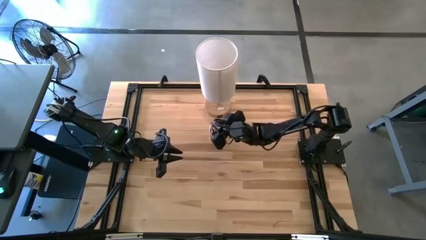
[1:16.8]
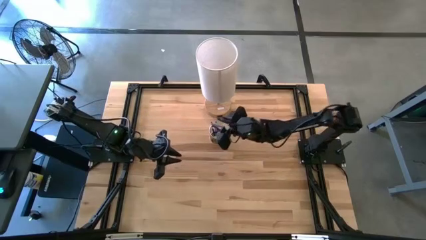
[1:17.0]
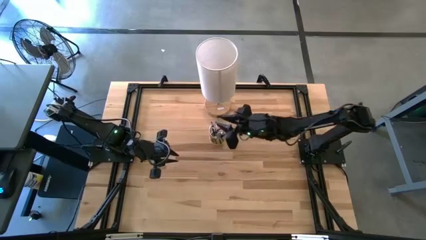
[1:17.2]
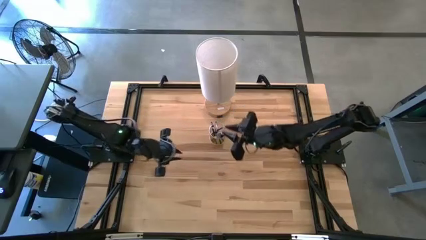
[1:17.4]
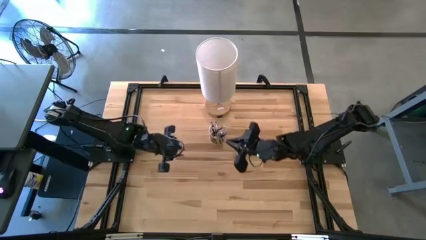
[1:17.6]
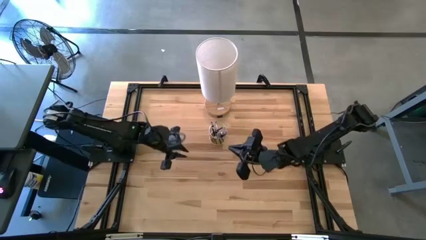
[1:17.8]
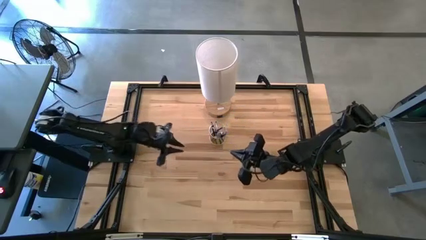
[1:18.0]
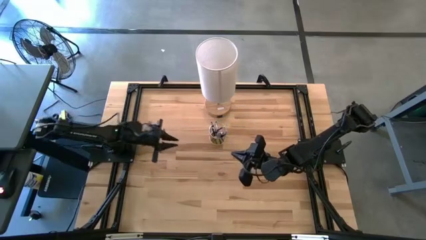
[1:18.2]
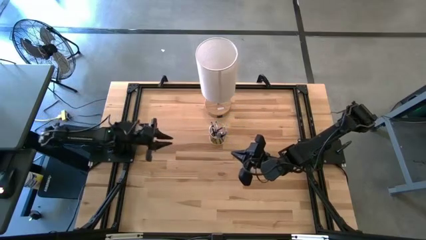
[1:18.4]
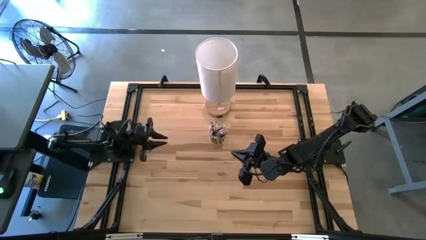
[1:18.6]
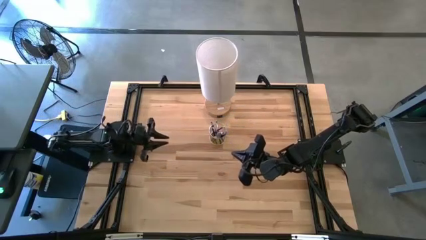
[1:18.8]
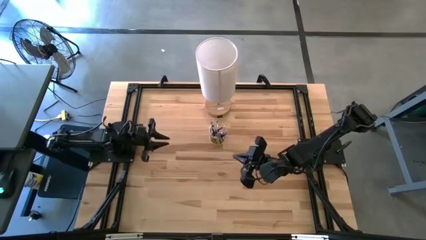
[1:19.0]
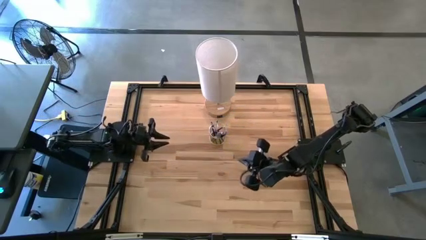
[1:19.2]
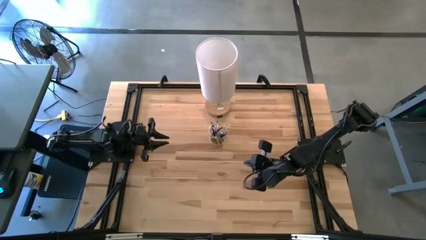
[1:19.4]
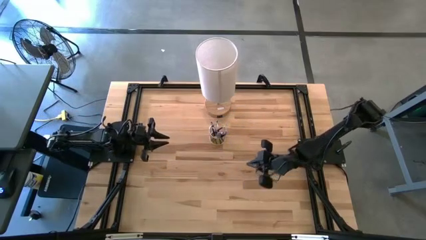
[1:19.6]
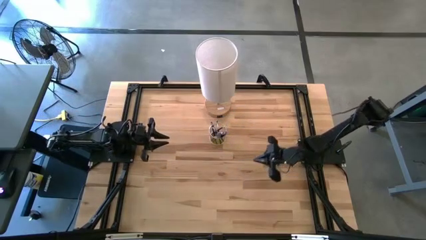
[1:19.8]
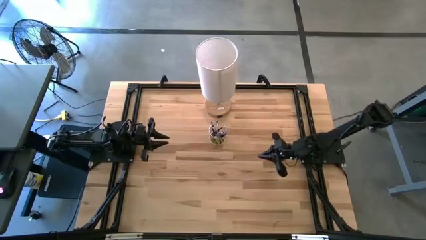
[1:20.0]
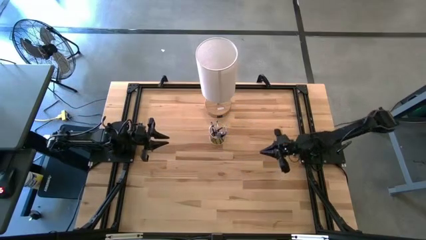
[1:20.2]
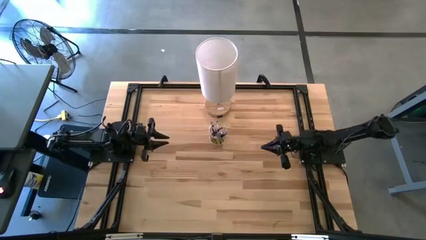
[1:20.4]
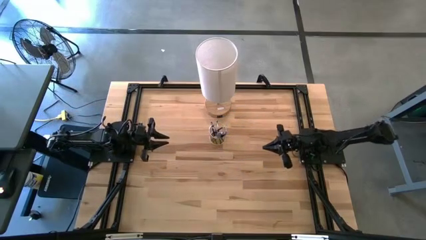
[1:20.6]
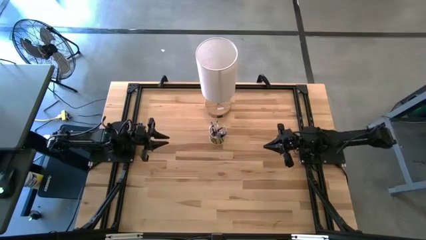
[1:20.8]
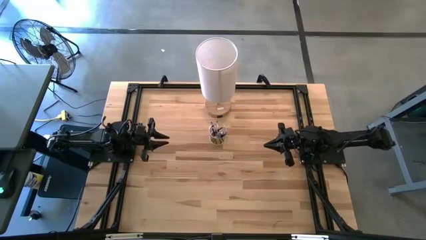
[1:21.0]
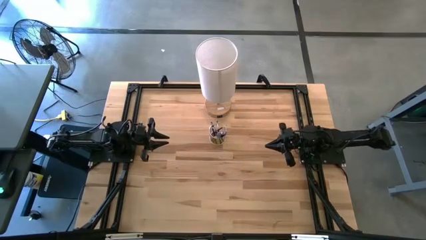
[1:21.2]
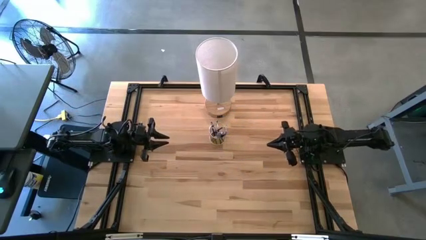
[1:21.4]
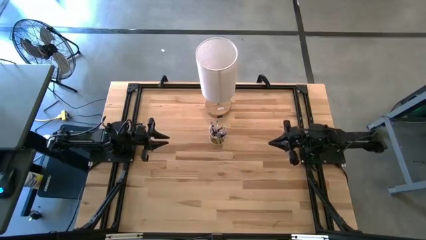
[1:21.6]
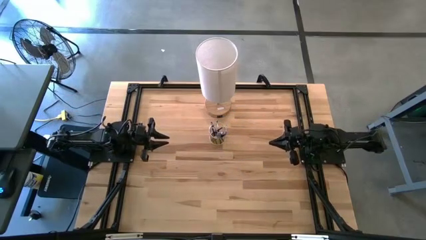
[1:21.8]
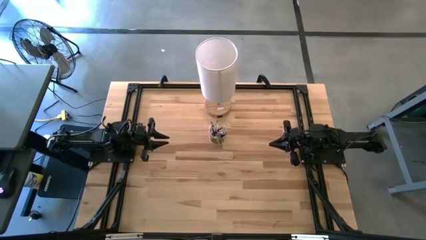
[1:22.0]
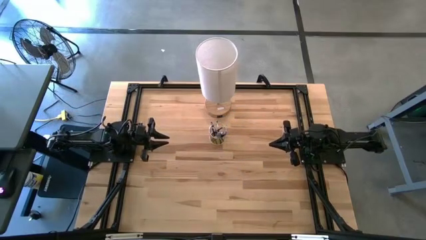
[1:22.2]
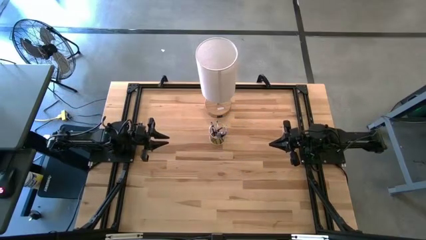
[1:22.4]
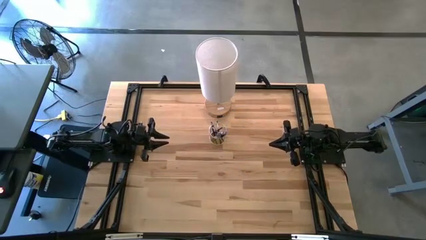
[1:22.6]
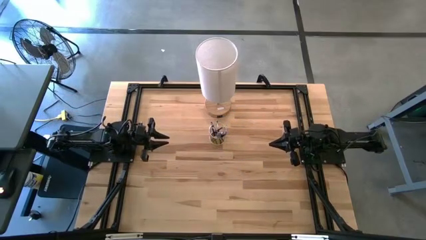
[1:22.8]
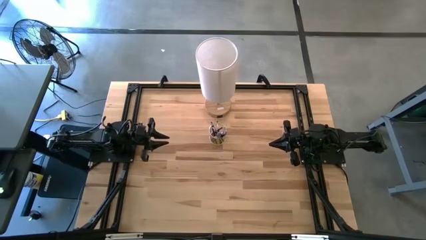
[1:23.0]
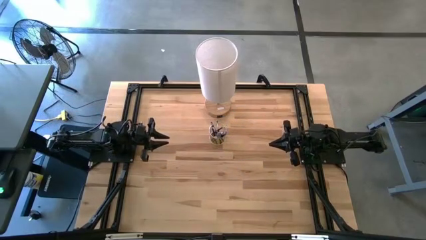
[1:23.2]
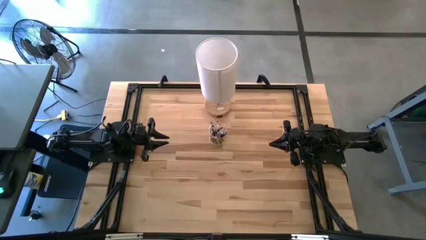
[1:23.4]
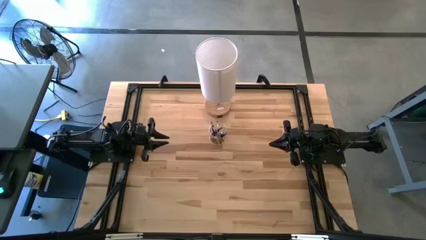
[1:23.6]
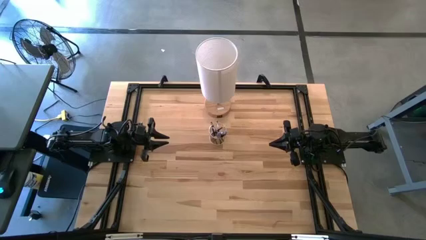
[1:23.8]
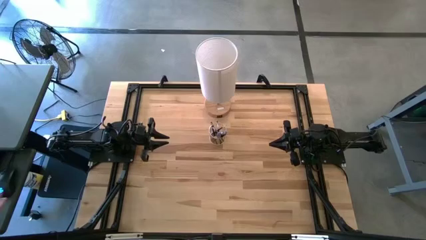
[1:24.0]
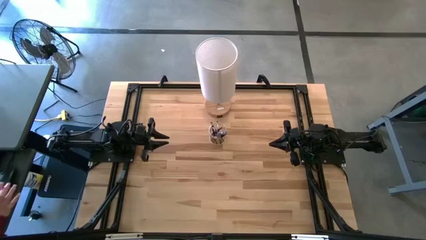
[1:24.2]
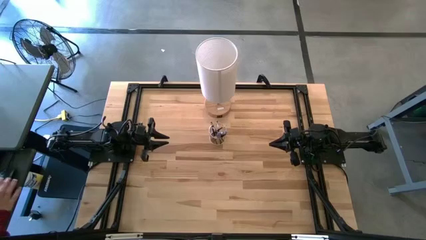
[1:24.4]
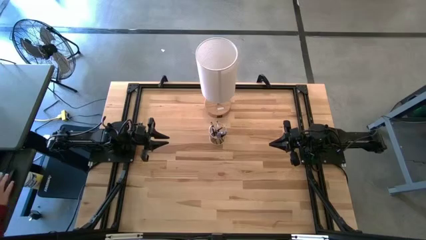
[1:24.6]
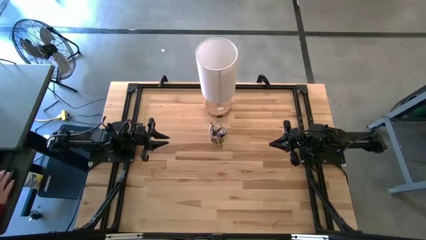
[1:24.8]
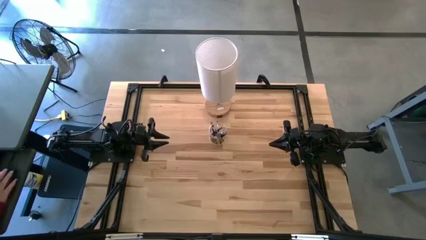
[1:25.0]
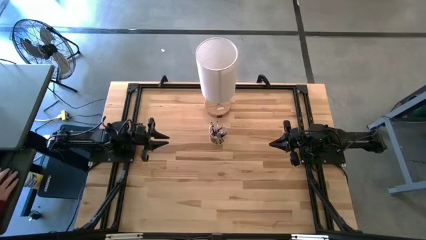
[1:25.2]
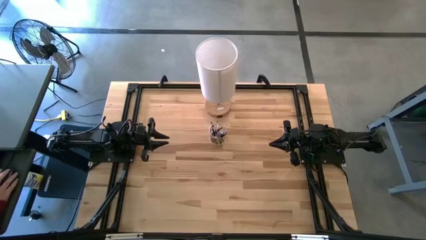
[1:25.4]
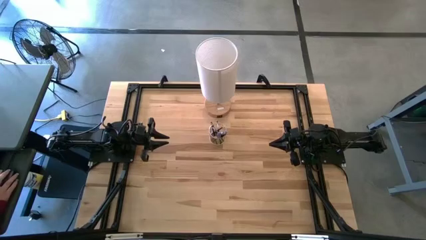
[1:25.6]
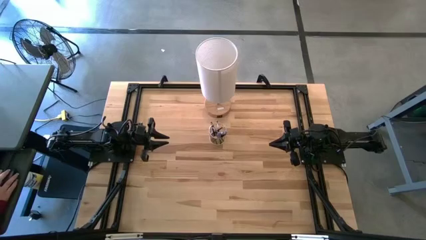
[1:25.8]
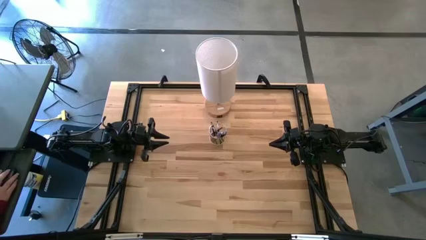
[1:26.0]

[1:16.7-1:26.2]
Task: Put items in baskets/containers
Return to Home Position

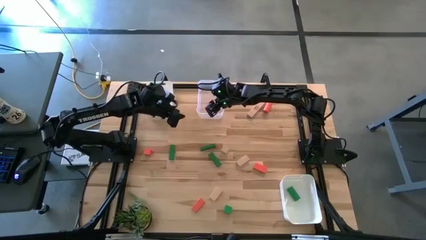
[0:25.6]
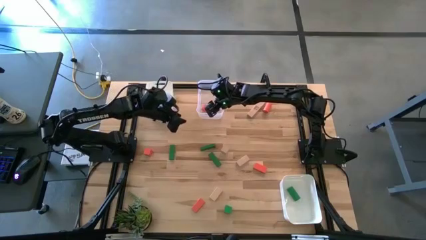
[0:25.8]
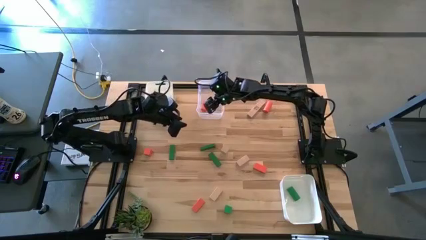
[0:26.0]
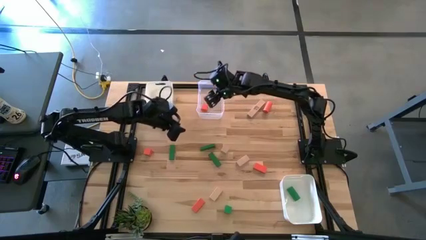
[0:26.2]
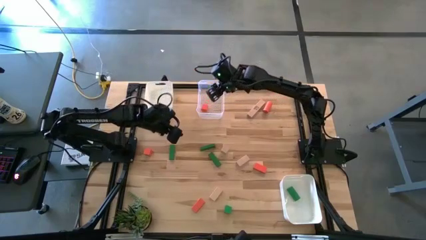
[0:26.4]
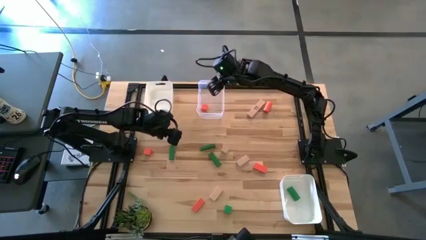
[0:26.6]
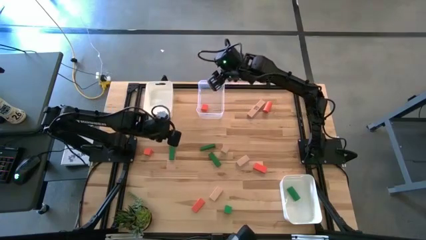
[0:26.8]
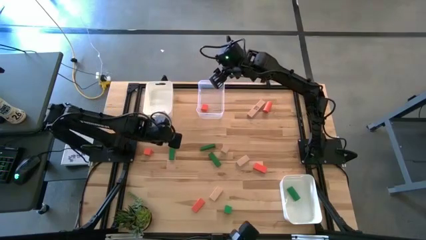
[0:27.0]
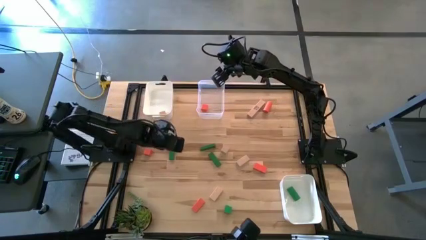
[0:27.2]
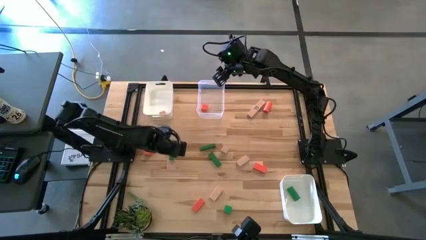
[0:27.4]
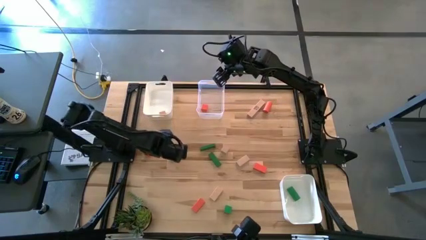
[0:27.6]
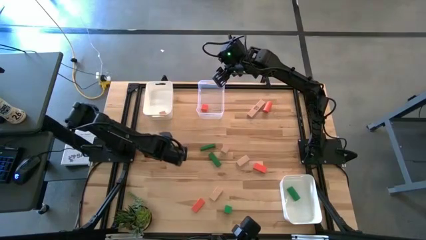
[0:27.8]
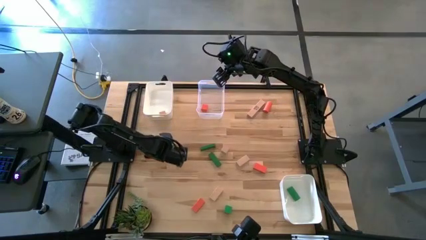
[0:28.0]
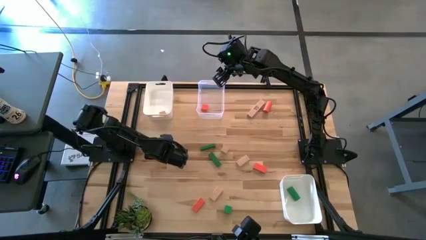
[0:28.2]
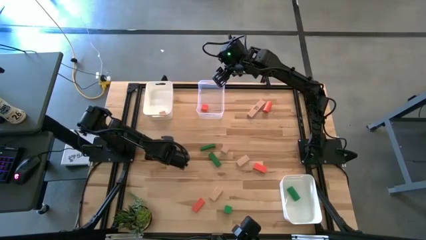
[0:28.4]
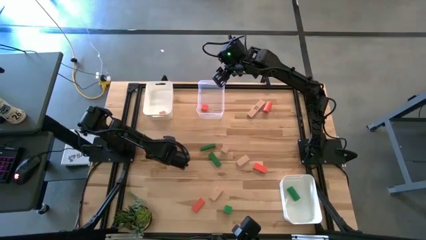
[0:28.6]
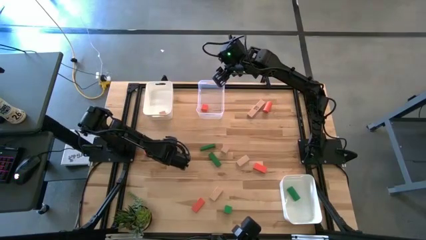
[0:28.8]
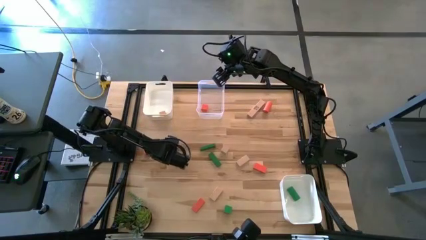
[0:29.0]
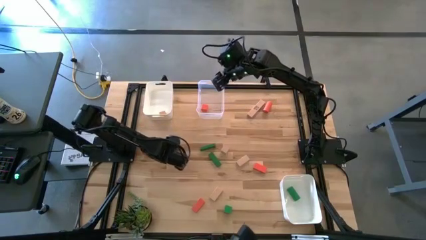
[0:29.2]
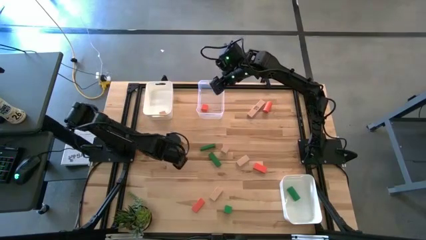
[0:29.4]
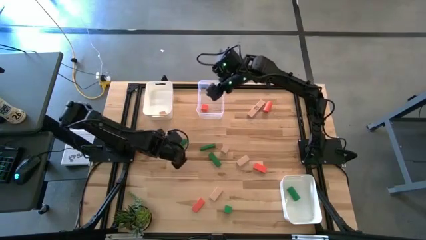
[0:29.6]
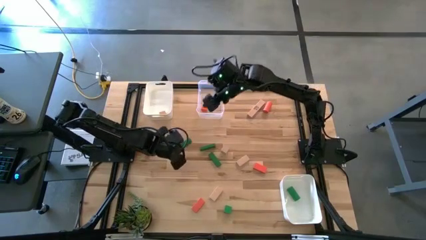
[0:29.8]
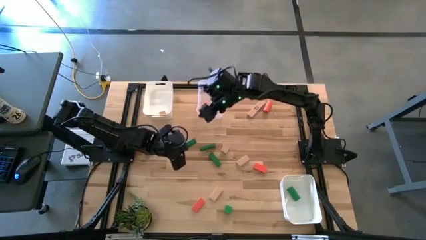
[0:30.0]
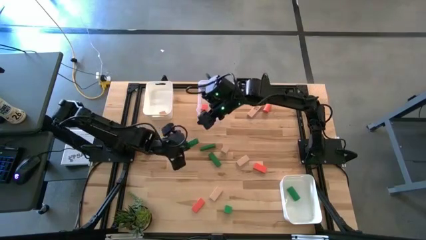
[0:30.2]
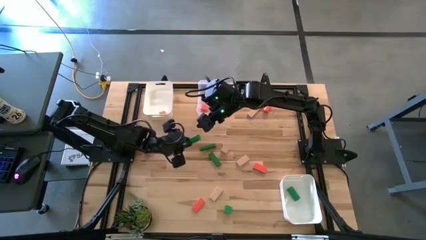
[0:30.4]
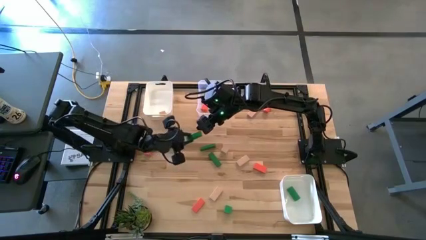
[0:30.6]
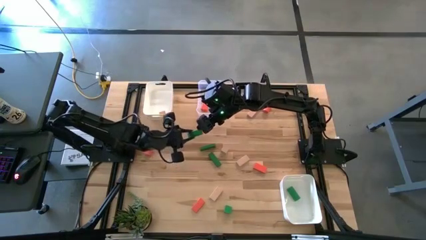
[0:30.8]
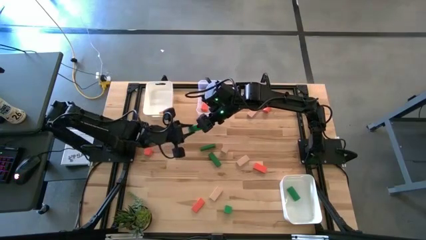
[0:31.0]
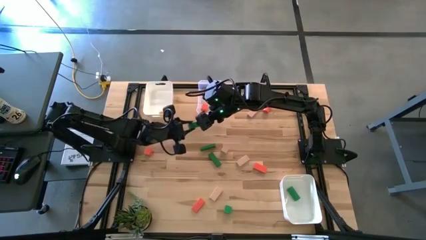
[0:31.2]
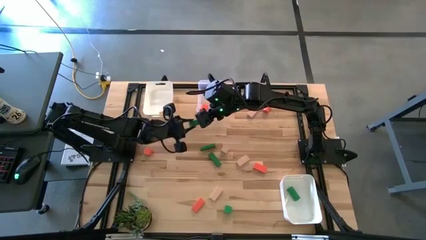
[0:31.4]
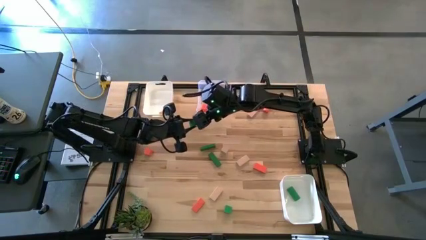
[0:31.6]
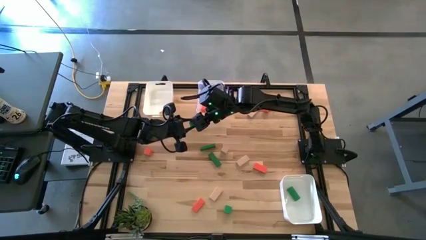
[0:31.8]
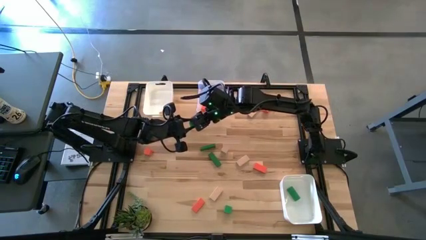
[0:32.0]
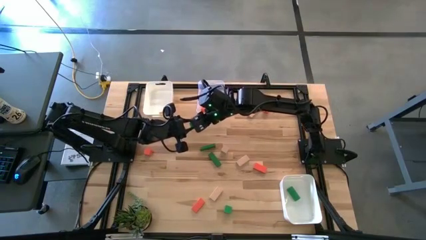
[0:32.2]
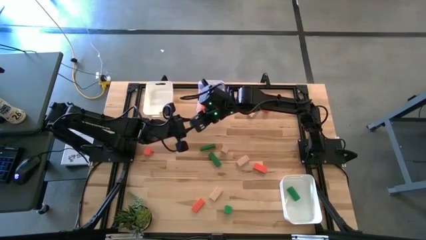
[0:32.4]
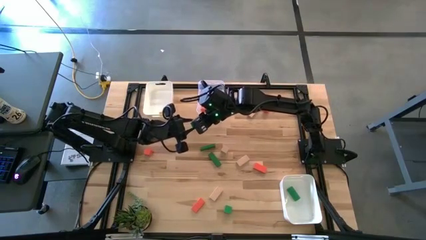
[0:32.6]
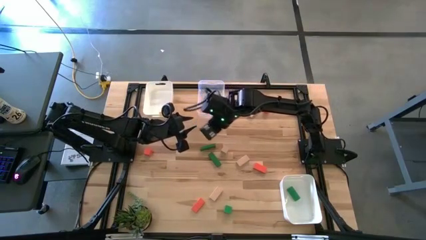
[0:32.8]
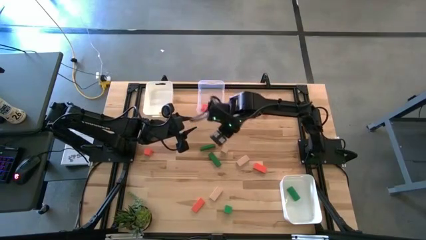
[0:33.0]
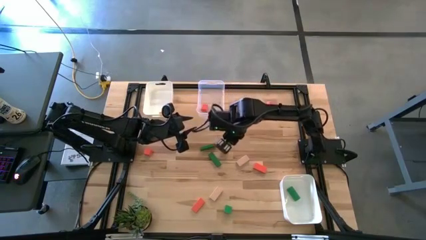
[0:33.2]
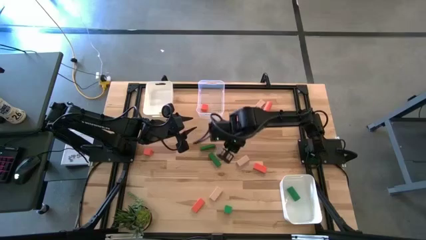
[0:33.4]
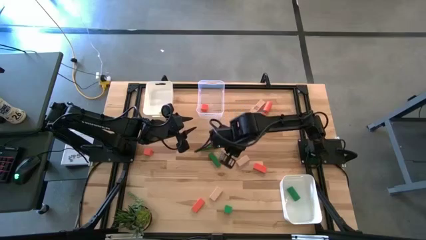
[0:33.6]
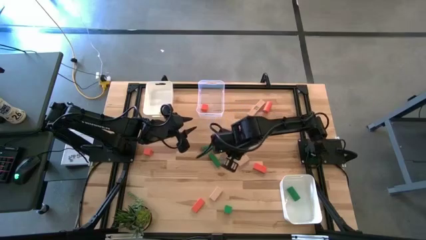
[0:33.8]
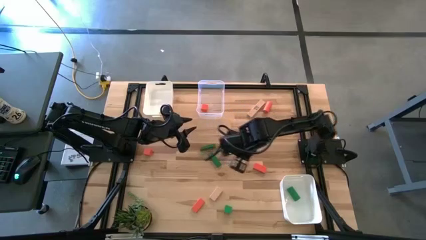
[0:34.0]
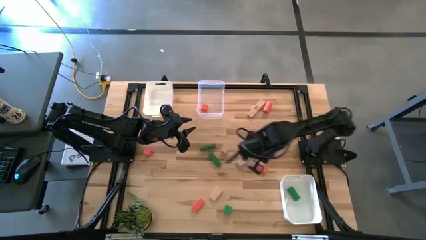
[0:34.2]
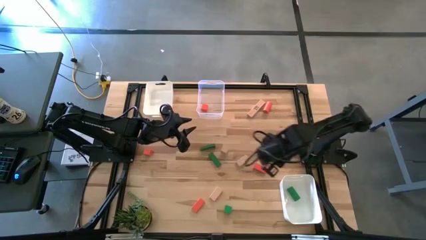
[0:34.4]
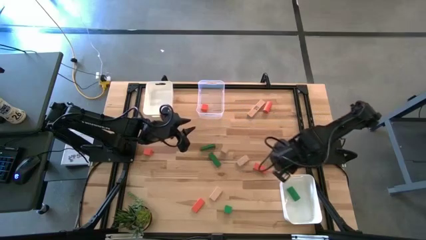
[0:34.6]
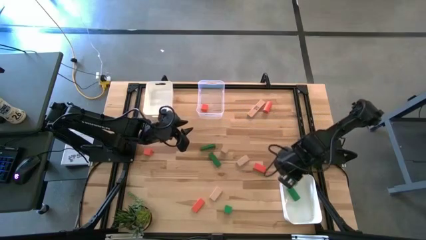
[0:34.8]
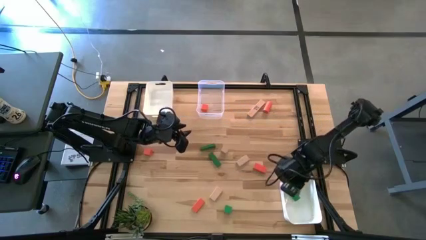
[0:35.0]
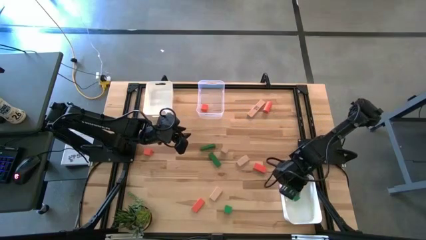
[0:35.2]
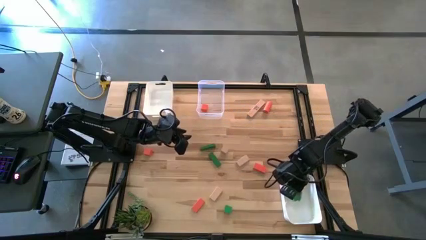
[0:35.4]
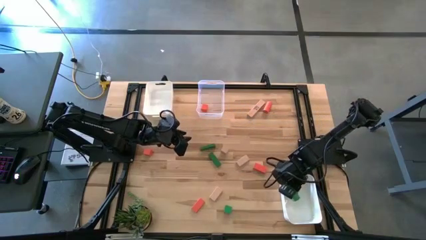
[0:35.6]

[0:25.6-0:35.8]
Task: Sort & place blocks by color
Put the green block into the bottom white bin
